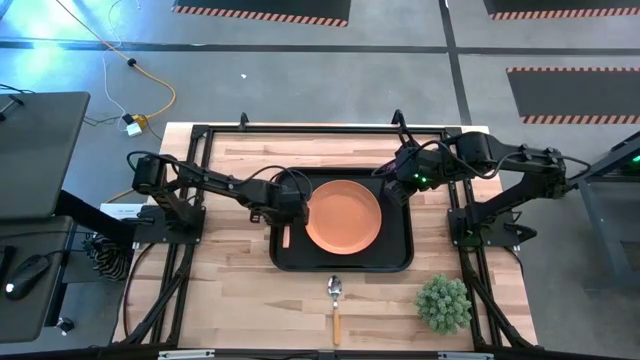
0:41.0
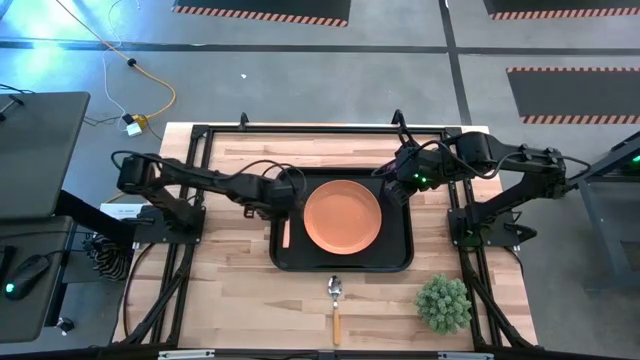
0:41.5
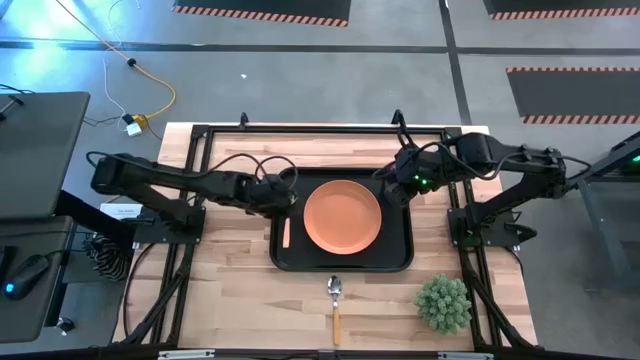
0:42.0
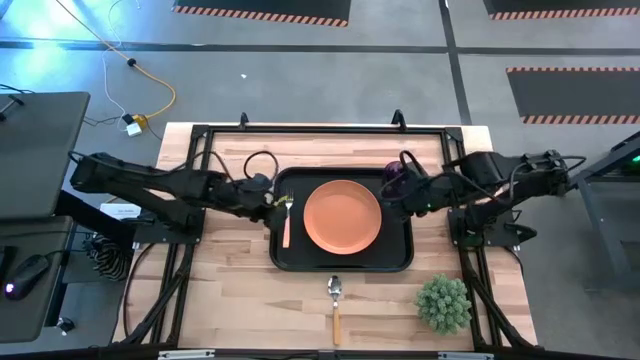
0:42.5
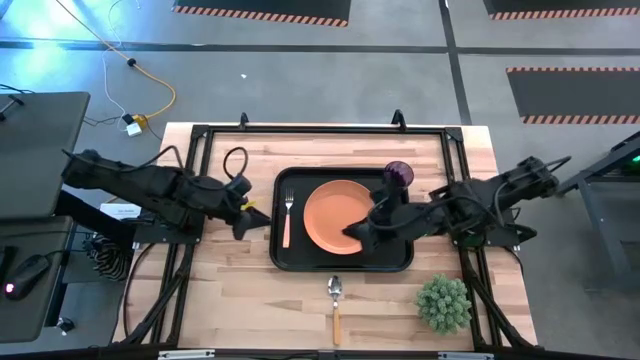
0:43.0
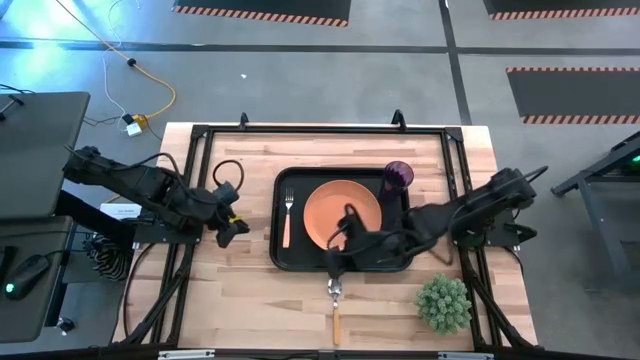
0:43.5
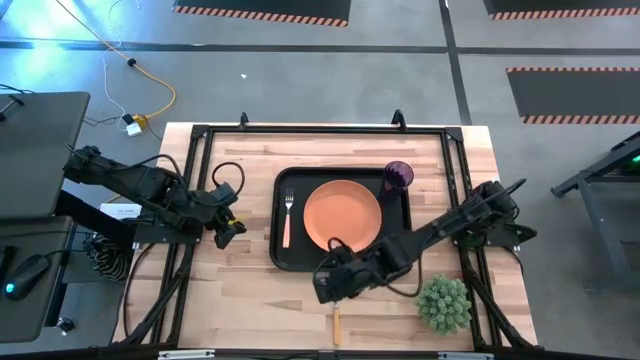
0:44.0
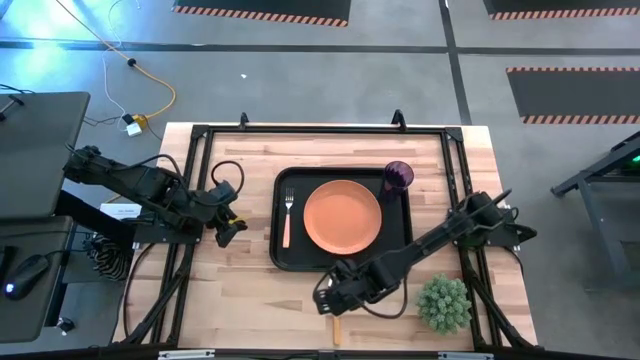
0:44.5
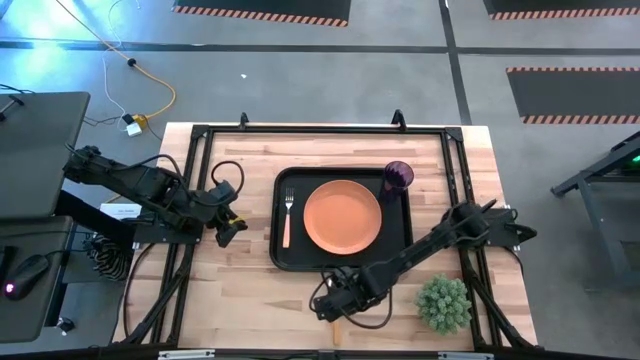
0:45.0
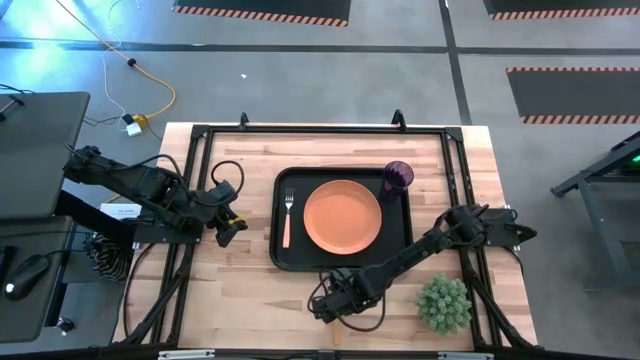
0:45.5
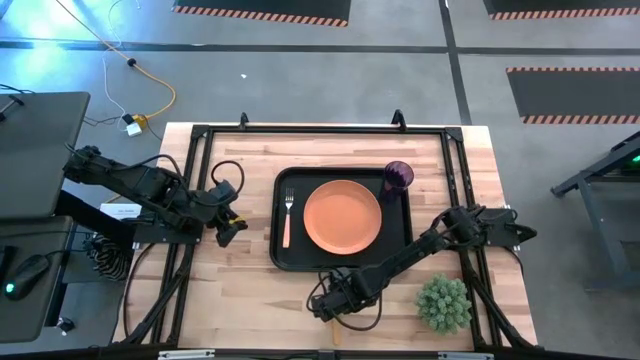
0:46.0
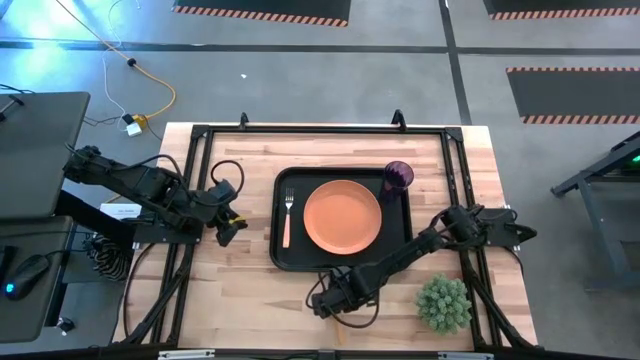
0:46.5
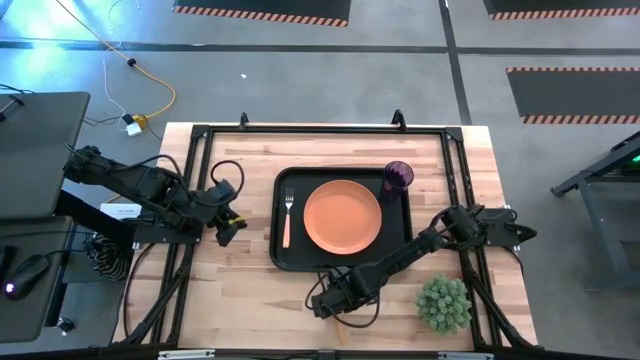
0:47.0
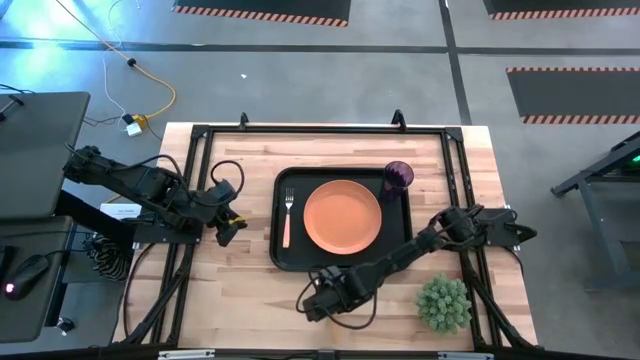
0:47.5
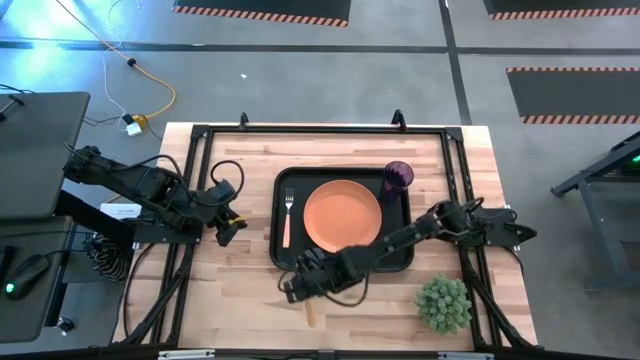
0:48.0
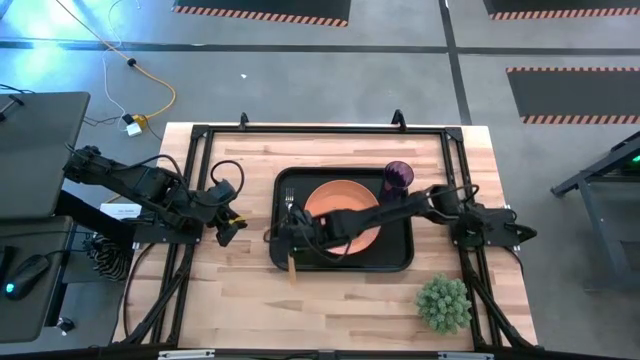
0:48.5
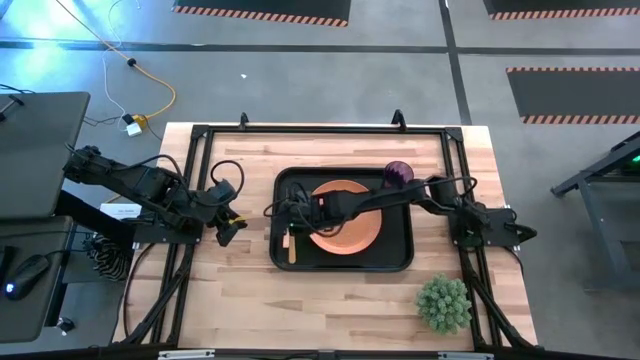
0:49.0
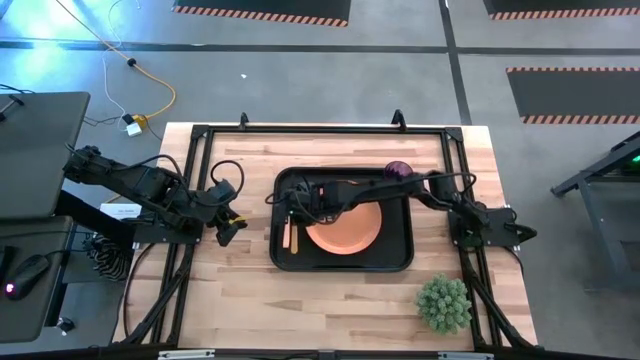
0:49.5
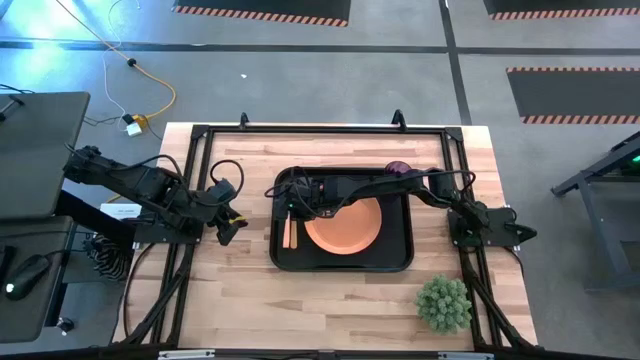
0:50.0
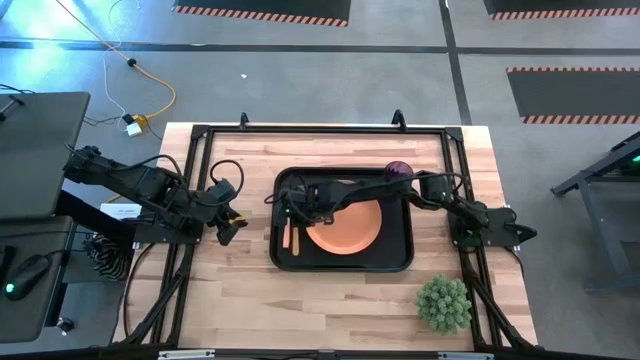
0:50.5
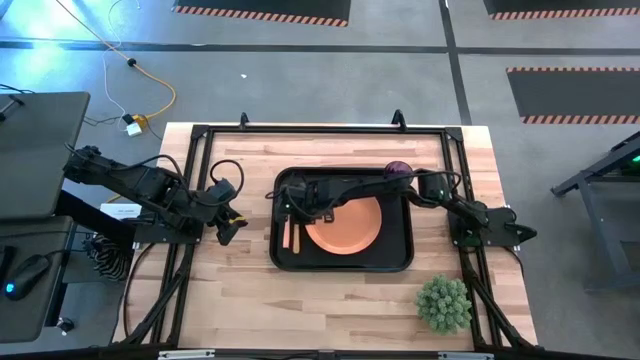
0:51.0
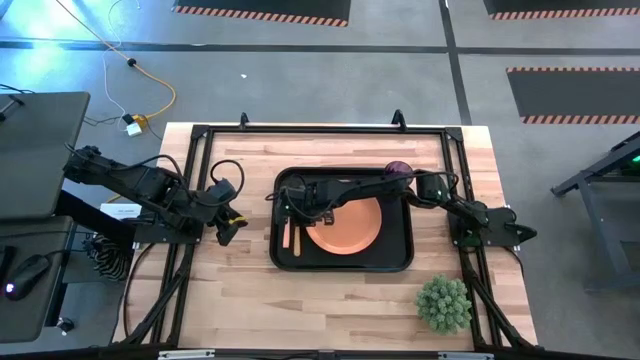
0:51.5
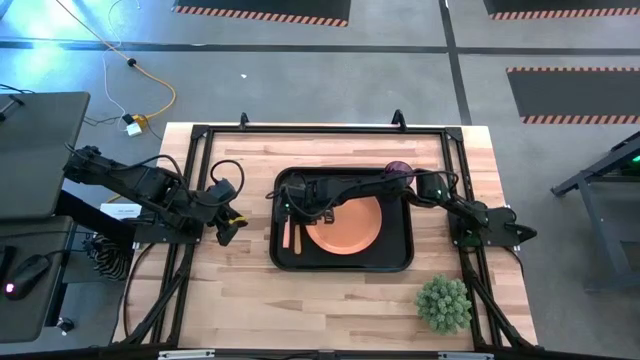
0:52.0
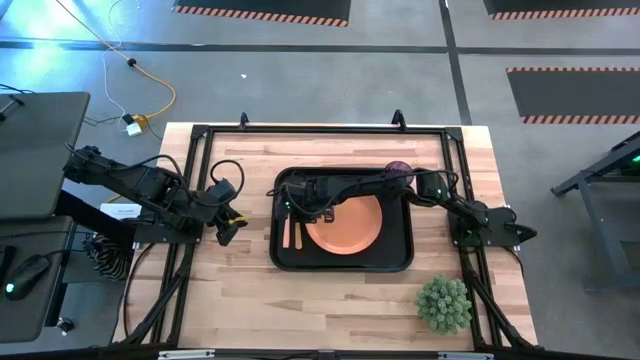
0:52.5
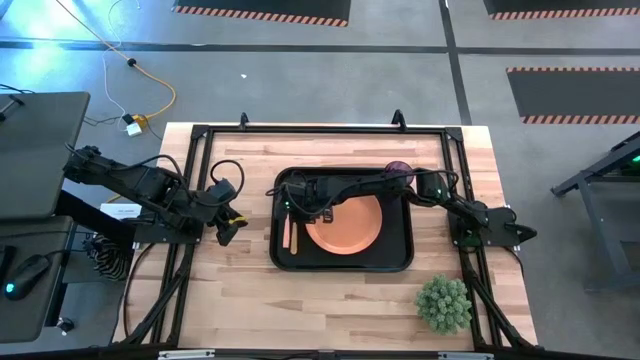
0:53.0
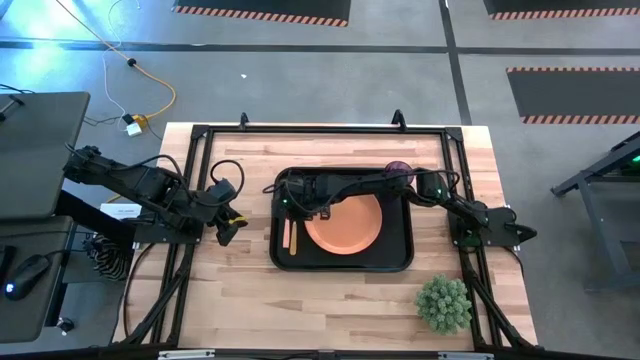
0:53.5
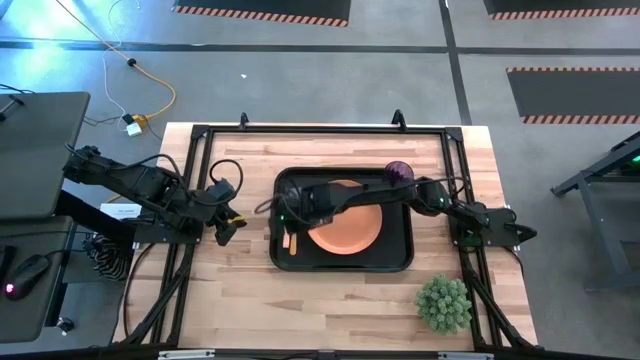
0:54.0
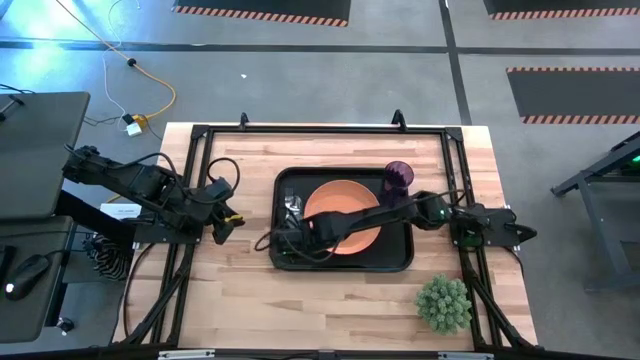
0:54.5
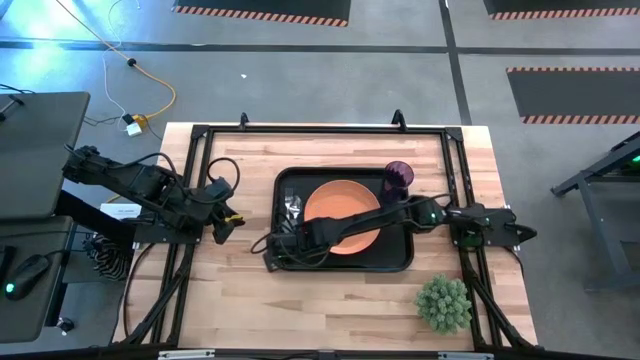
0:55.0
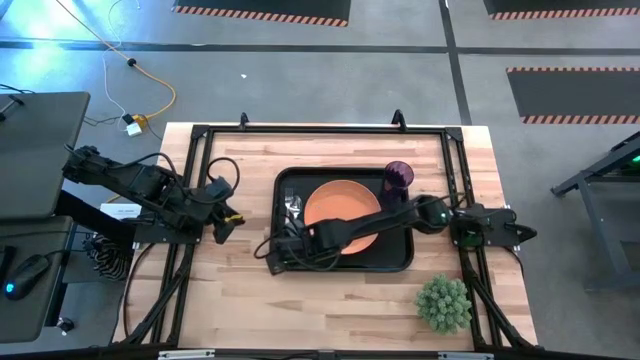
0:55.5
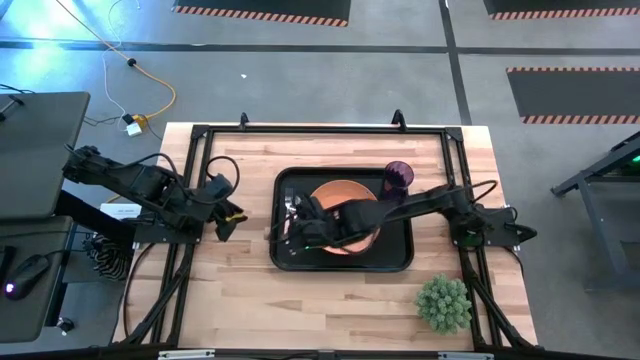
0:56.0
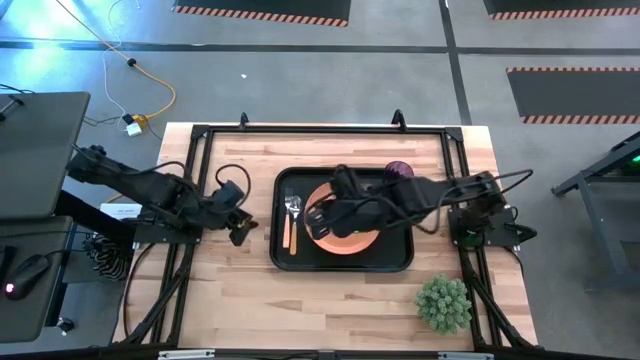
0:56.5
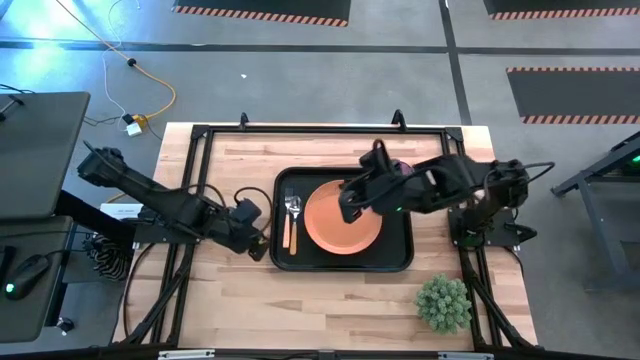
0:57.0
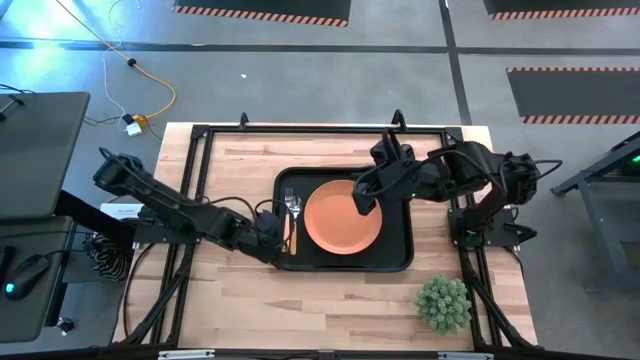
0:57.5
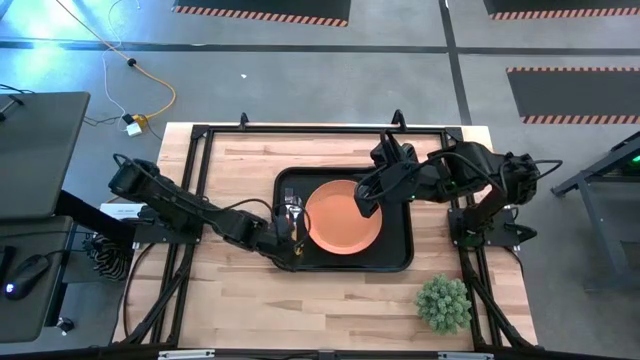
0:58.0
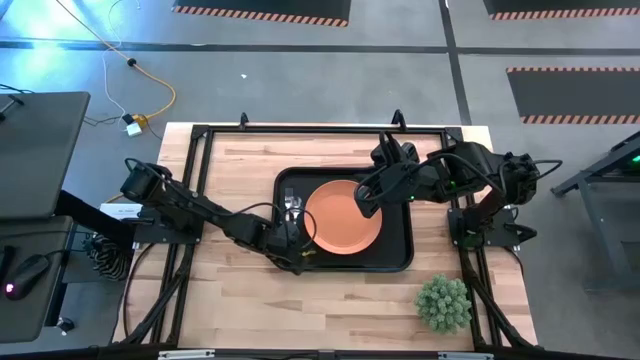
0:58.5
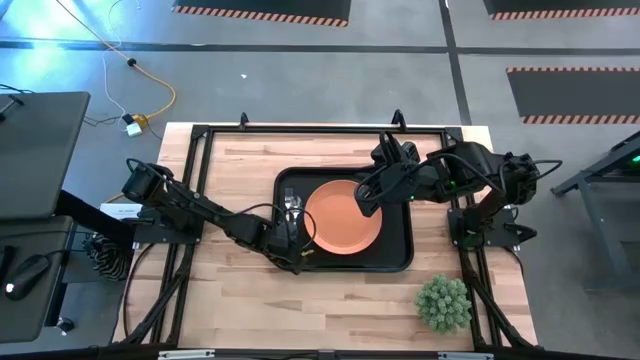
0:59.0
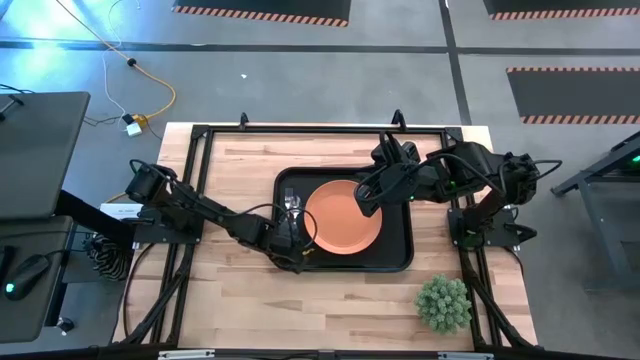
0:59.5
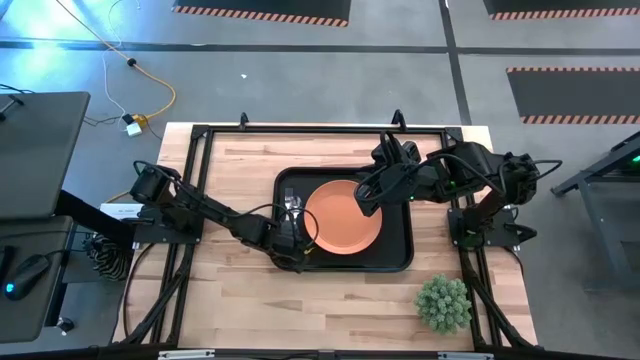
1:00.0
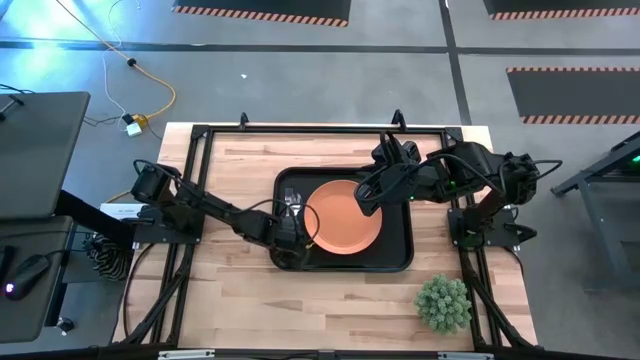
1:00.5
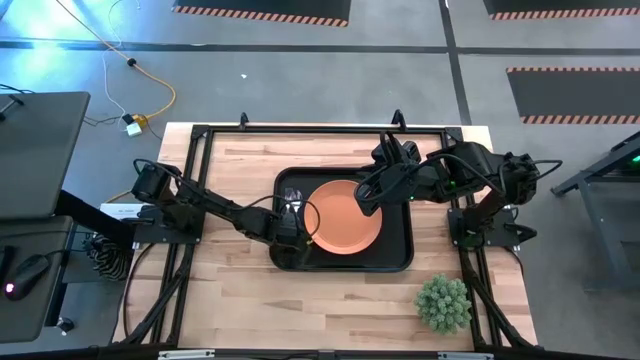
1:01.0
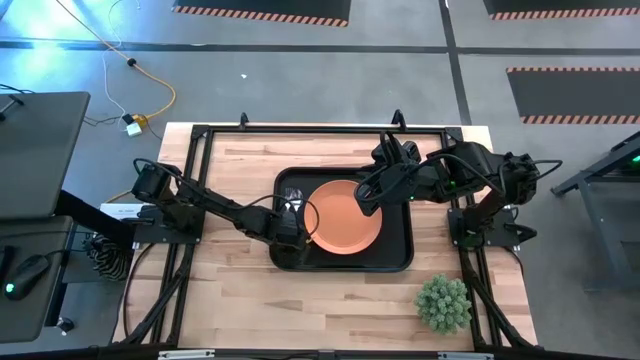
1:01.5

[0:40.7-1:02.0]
Task: Pick and place plate/cup/fork/spoon on tray
Put the yellow spoon on the black tray between the orange fork and orange plate
